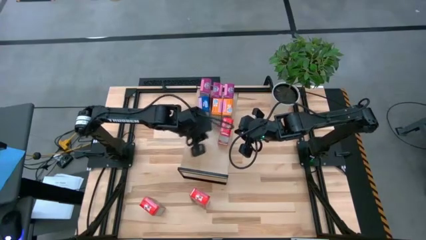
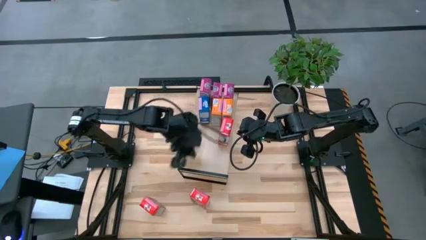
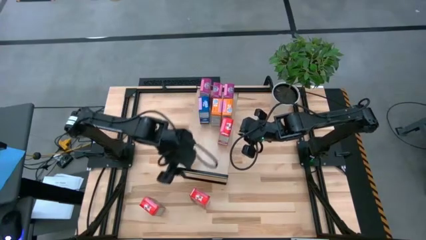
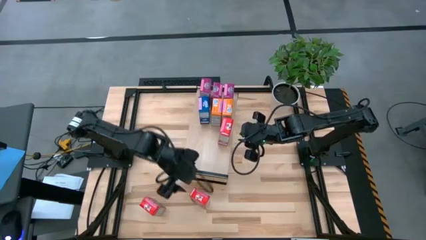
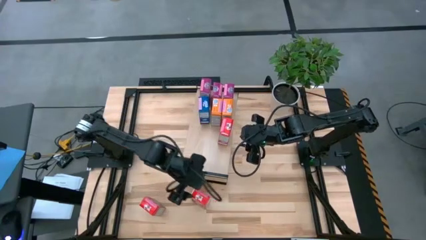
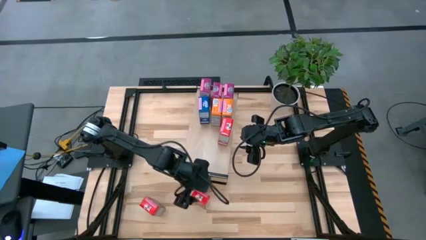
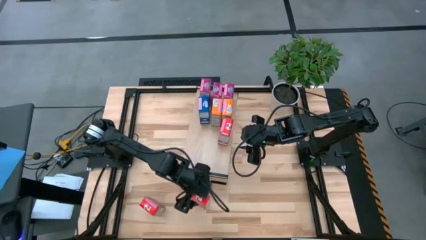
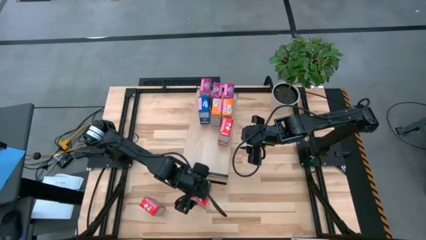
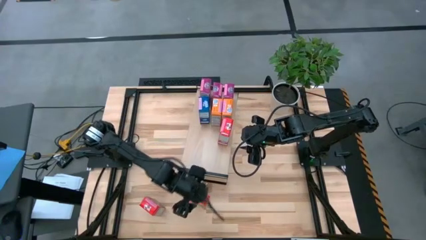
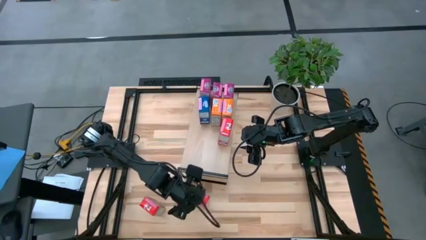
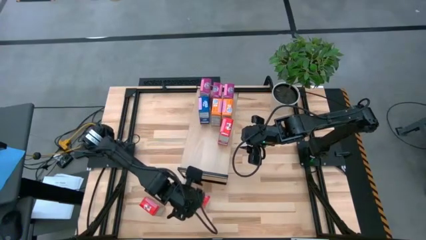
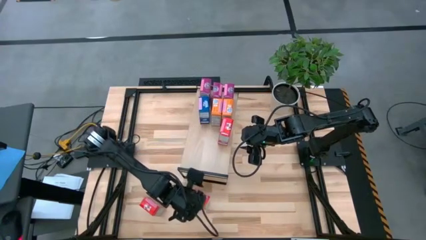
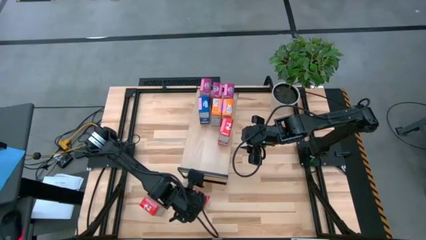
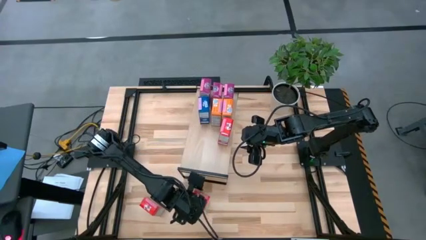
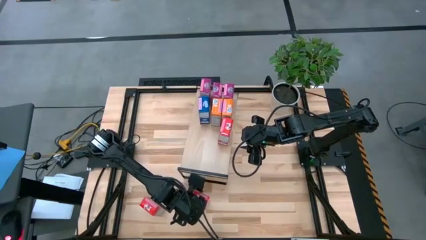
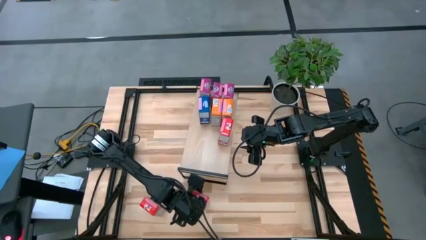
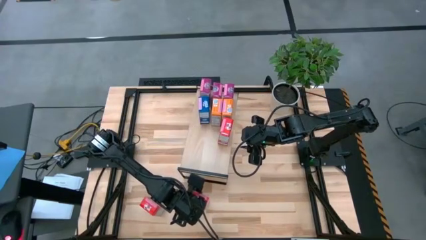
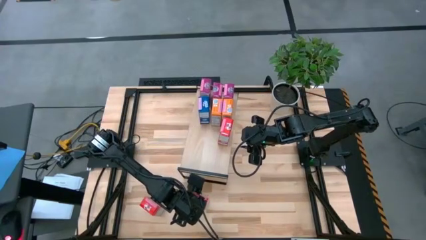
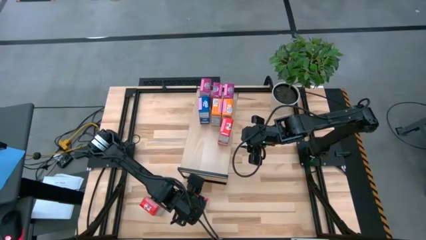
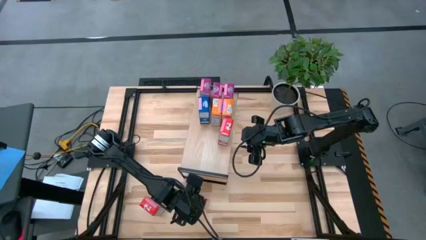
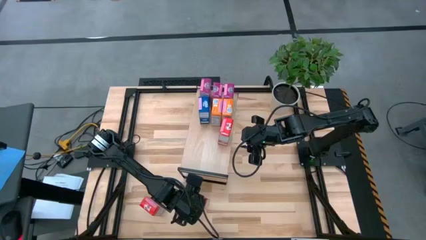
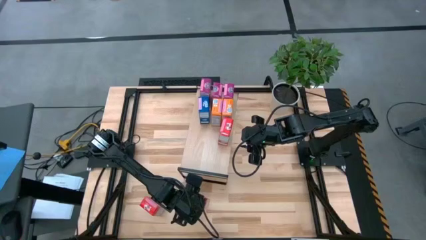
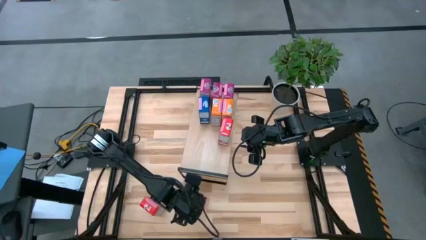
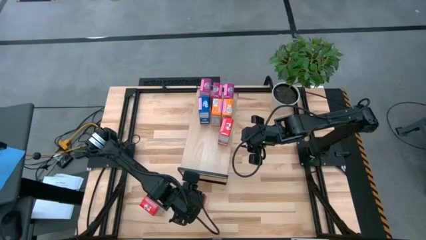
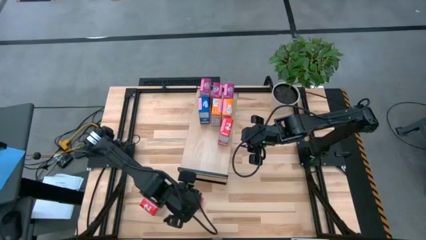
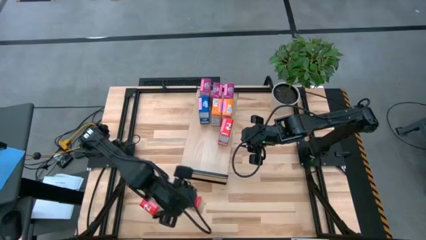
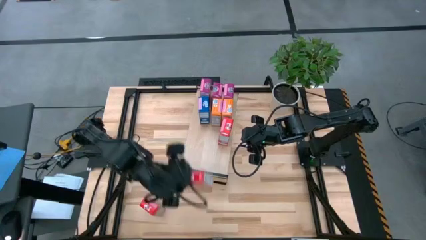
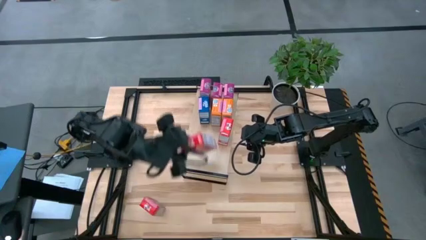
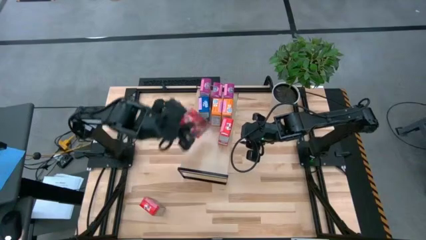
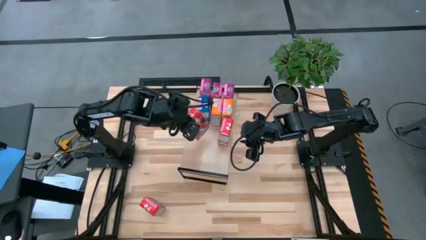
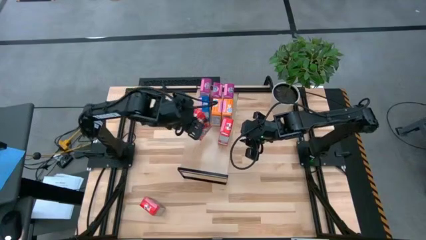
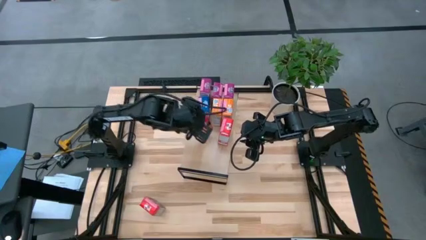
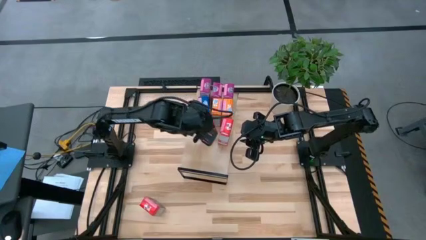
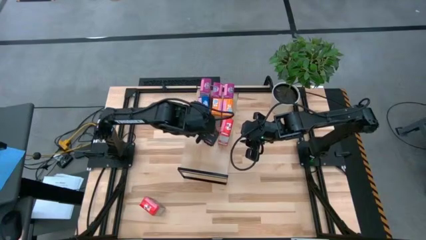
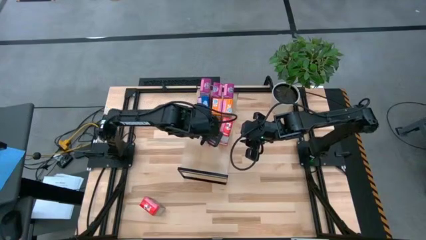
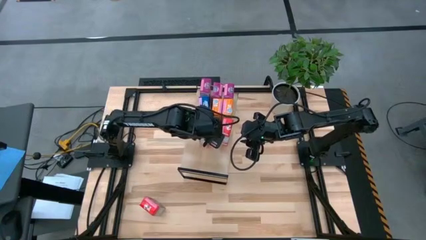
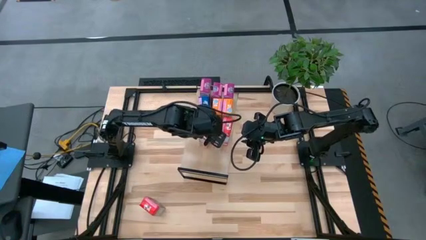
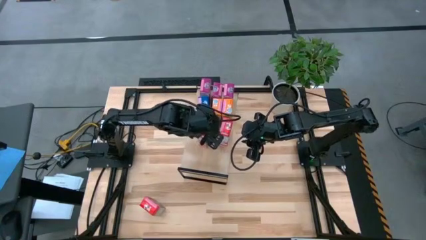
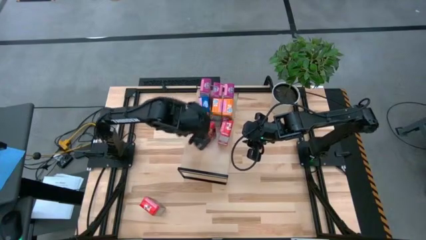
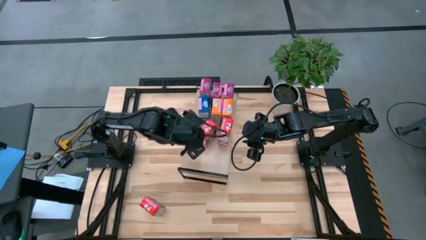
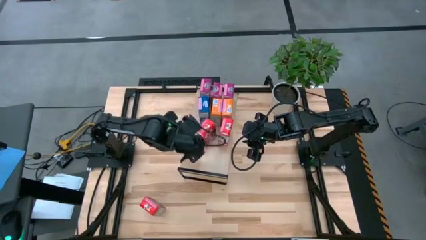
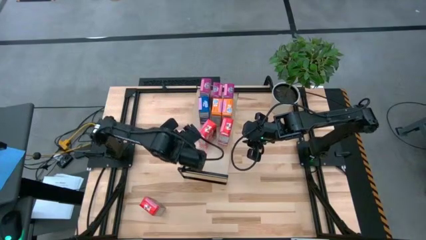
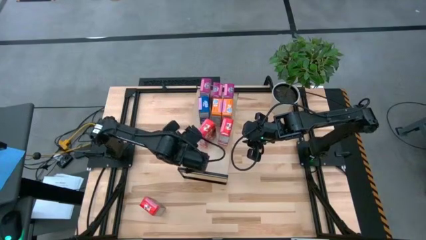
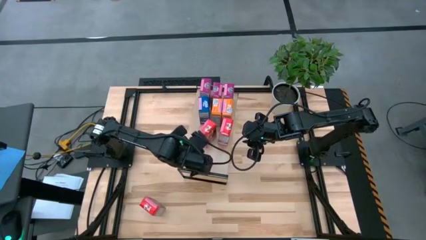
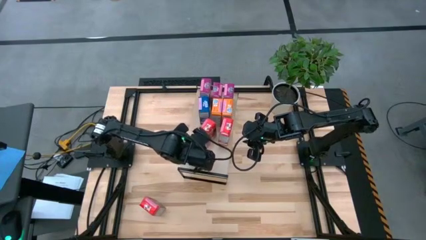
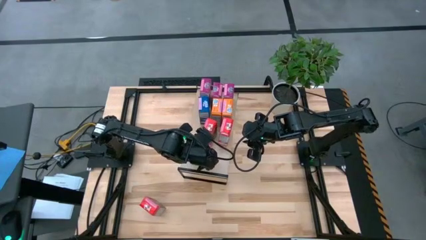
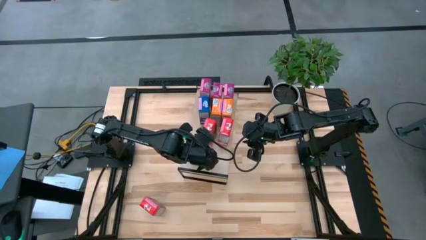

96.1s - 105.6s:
Task: Stack cereal on shelf
Put the right red cereal box into the shelf

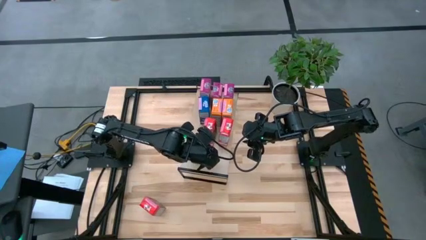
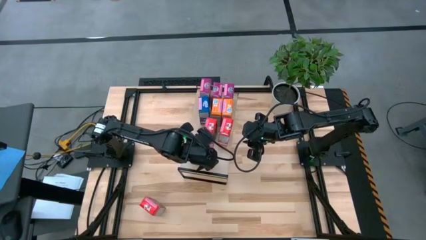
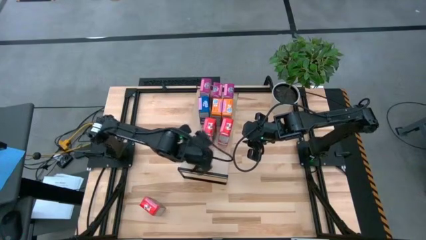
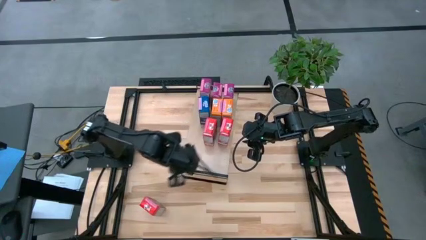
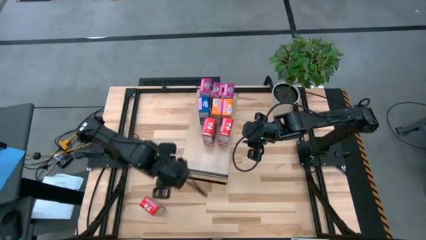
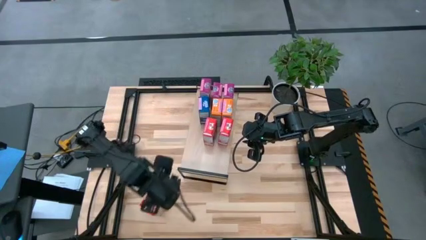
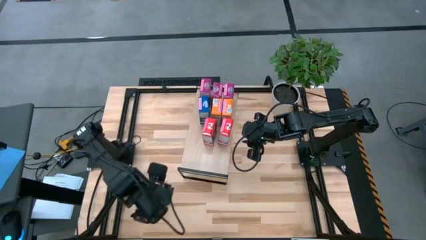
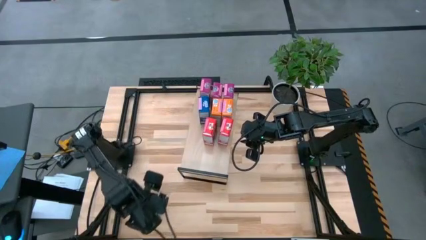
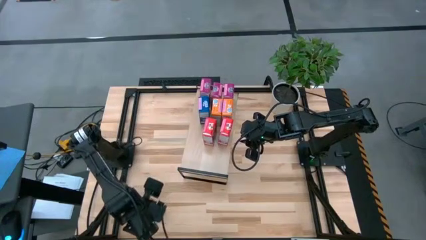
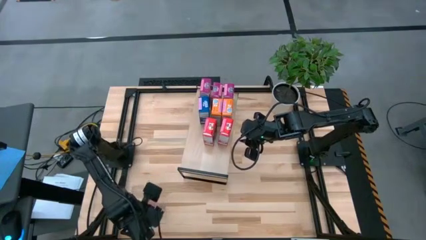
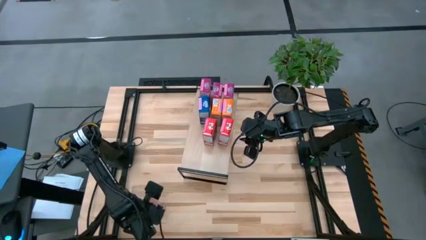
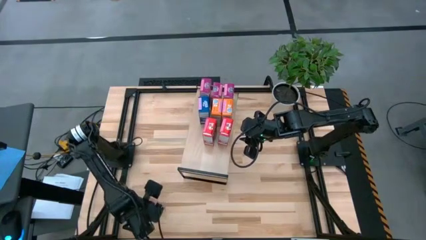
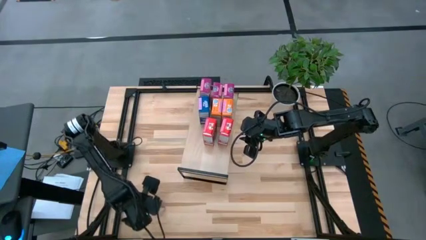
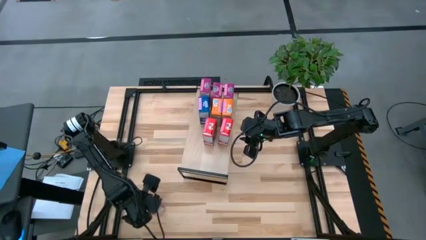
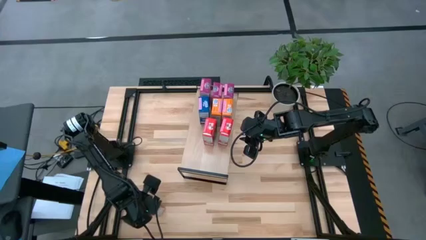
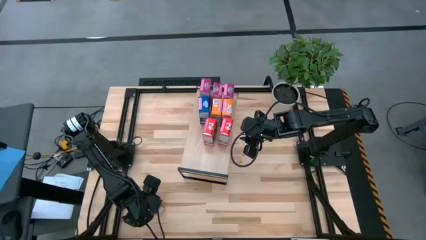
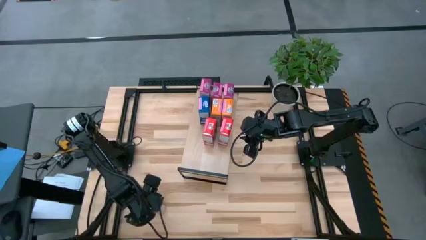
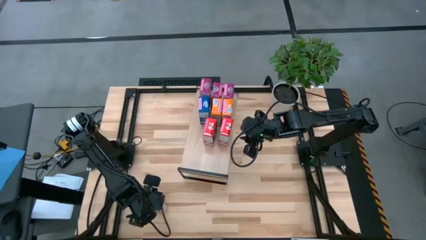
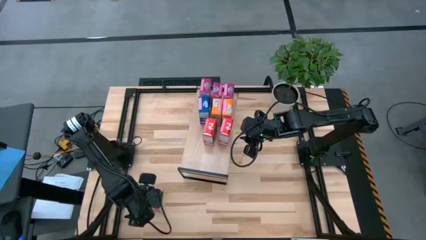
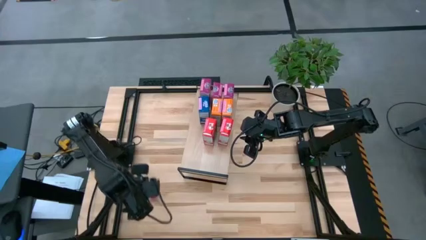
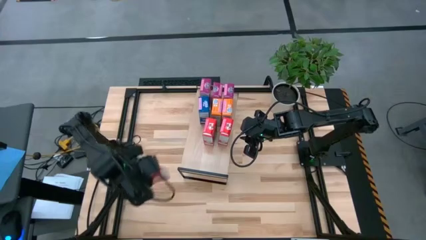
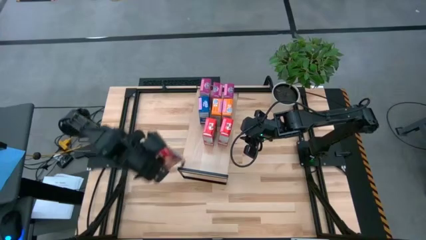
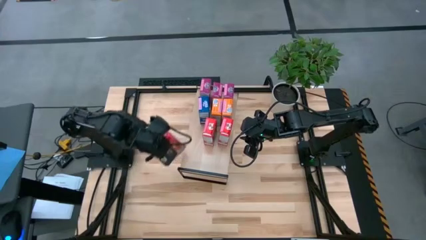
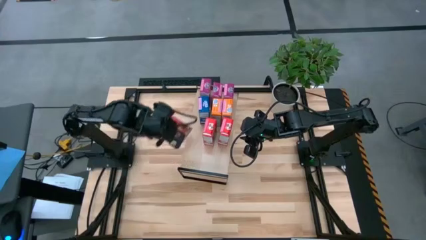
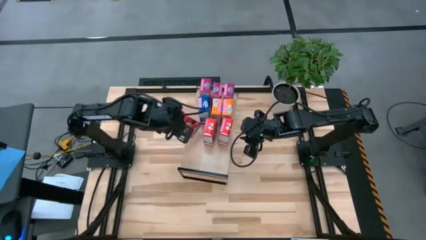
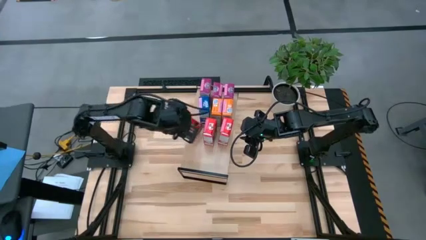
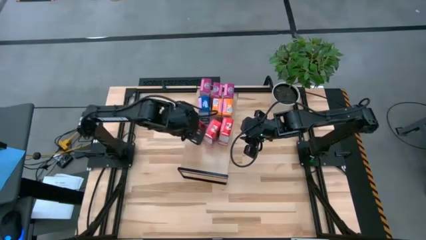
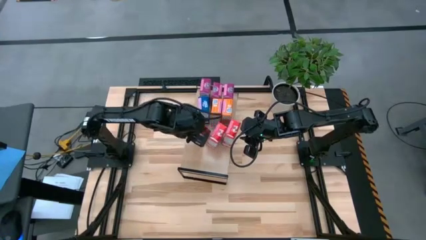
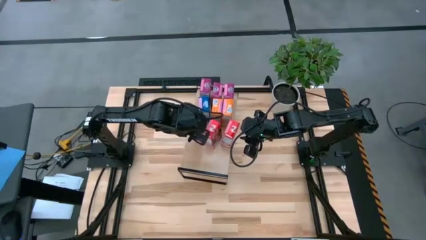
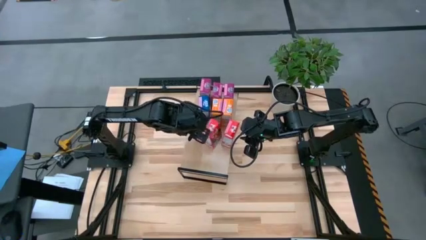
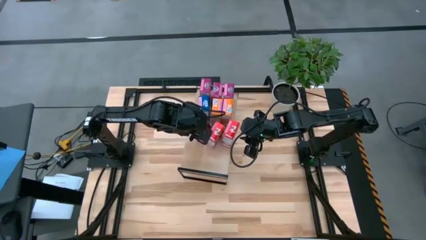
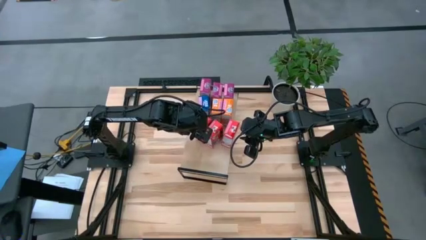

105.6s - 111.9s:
Put the red cereal box into the shelf
